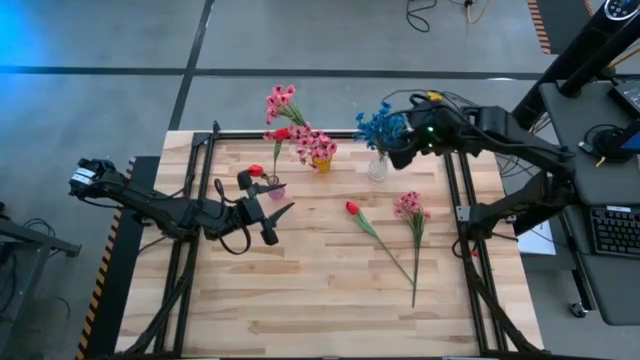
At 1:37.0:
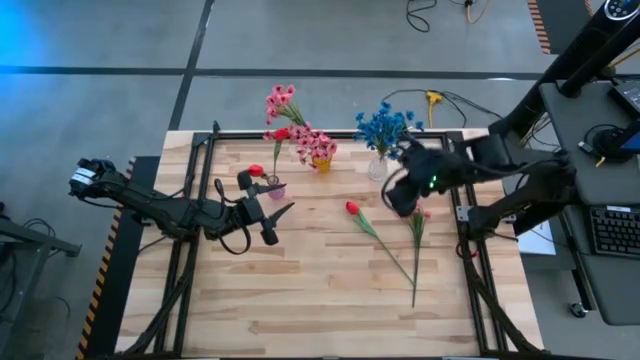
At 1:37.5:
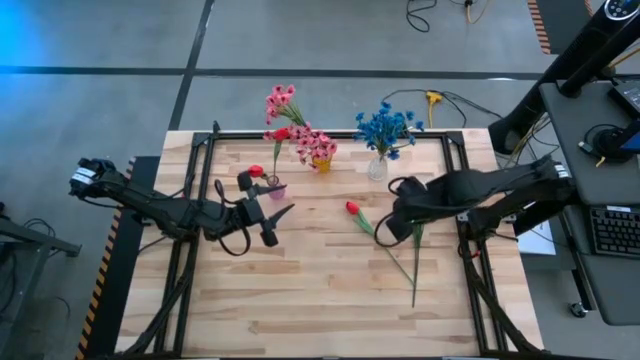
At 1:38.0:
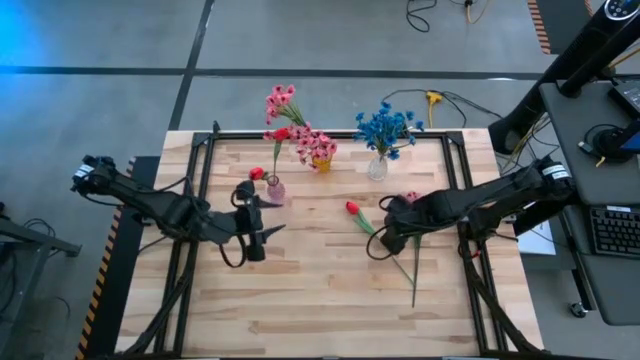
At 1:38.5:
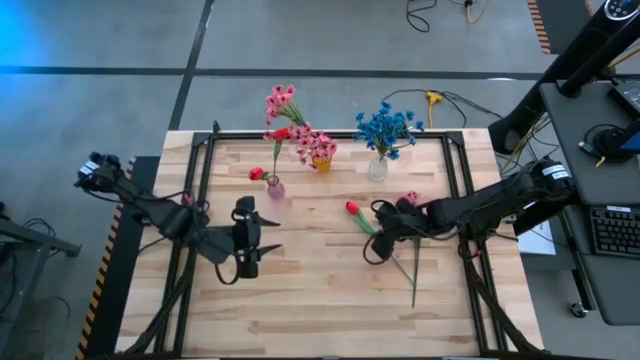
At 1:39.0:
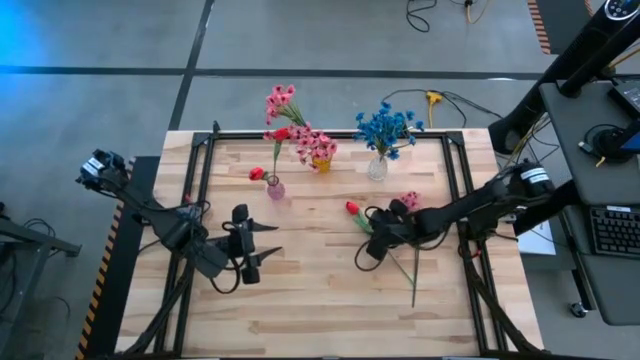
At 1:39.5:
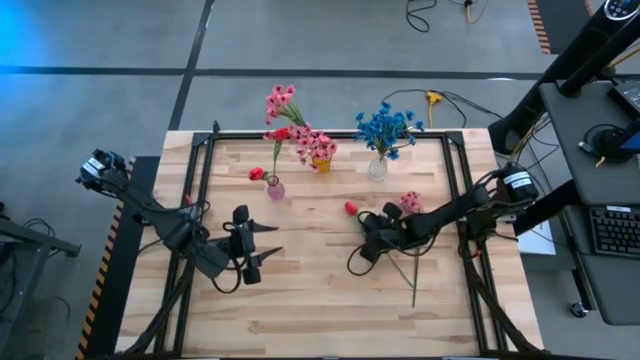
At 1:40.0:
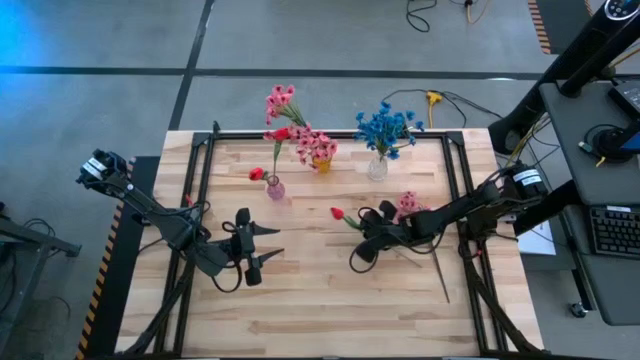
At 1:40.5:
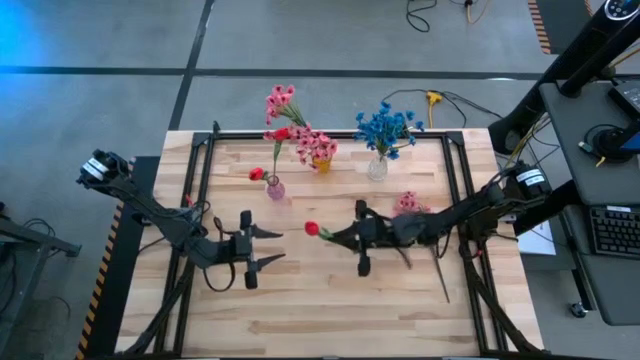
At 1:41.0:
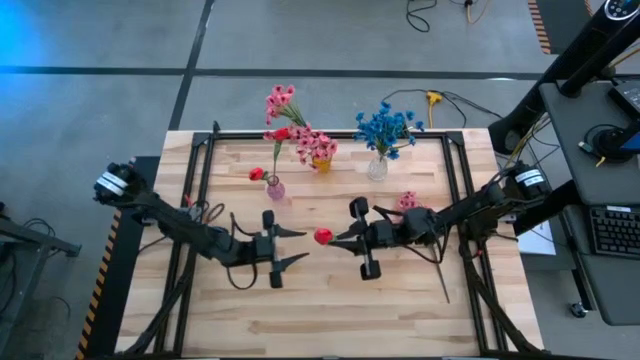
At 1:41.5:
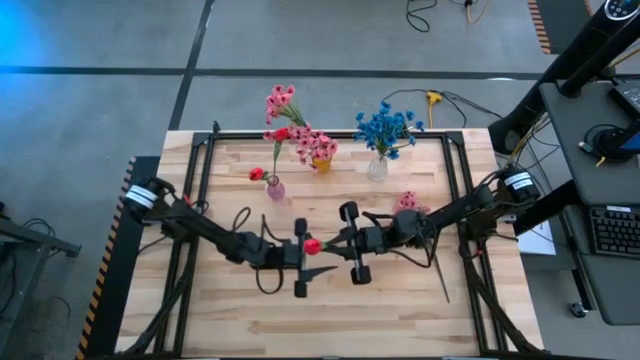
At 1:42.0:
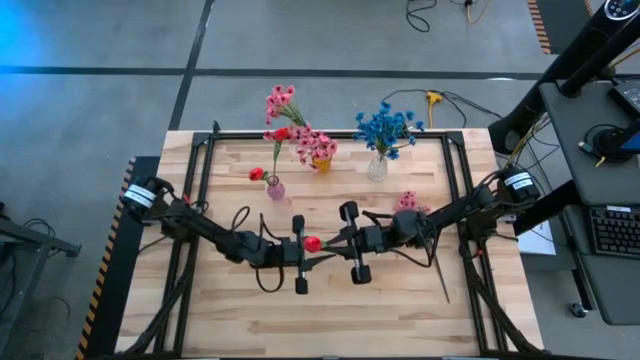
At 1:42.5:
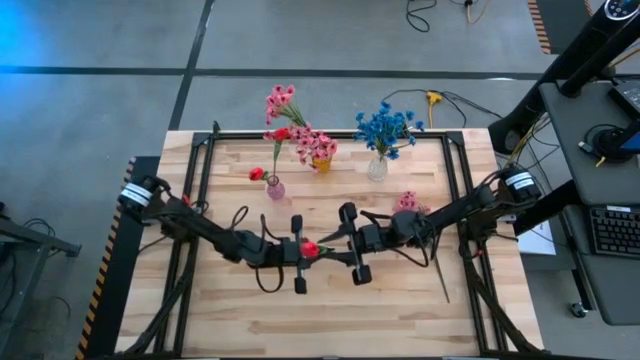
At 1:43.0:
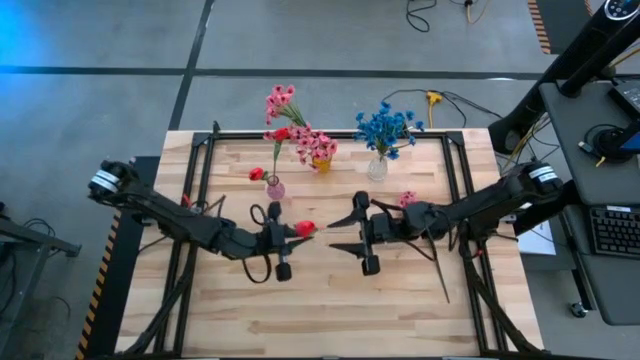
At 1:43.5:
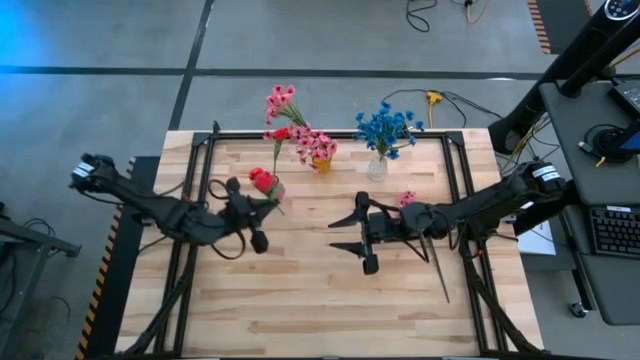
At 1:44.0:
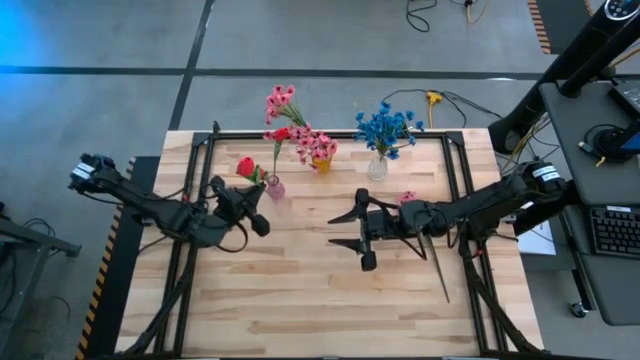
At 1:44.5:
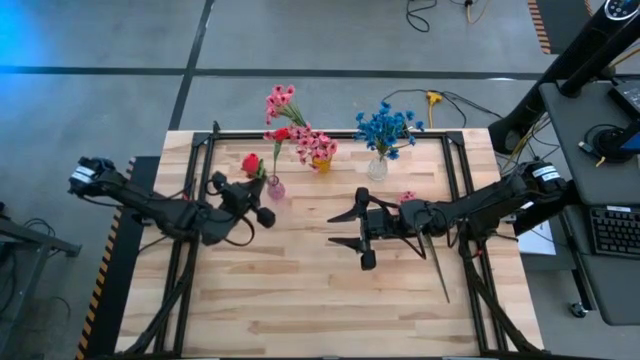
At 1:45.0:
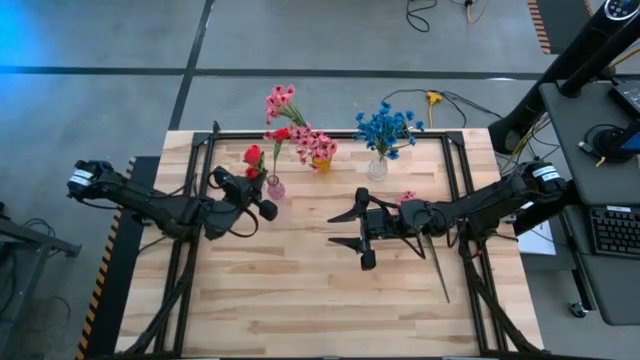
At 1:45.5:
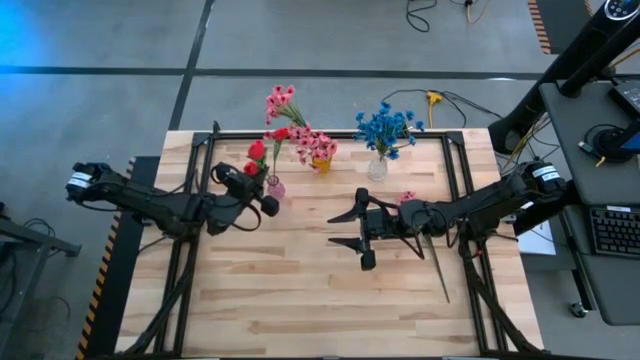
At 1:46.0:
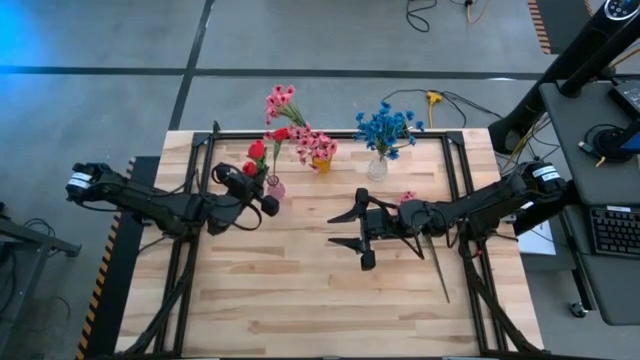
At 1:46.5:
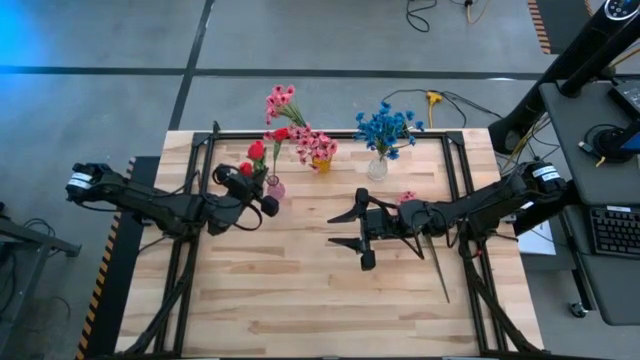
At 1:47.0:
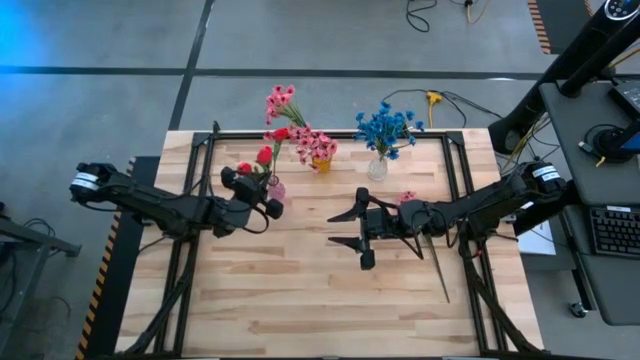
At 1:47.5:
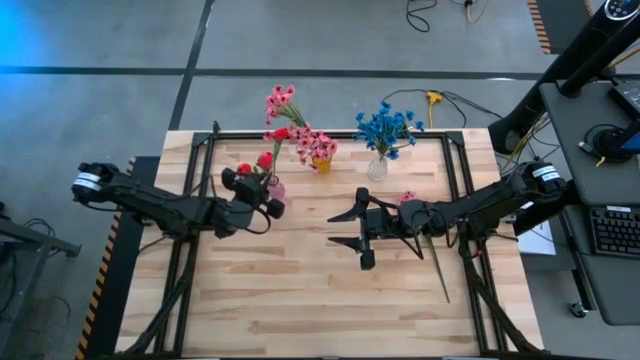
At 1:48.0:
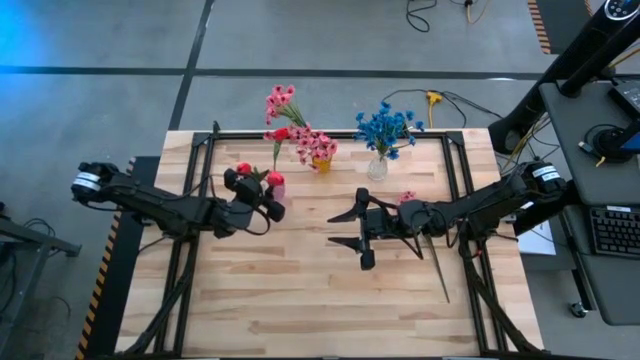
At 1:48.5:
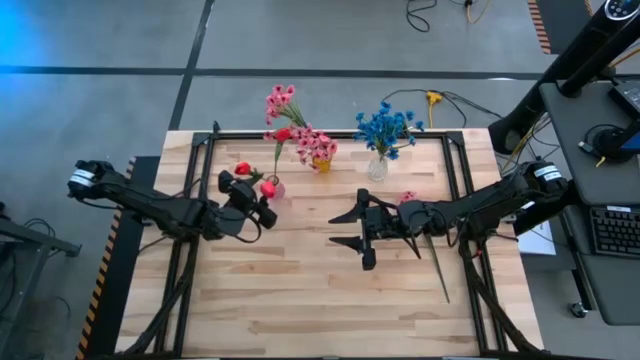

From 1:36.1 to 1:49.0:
Task: Sort flowers into vase by color
Put the red flower into the violet vase

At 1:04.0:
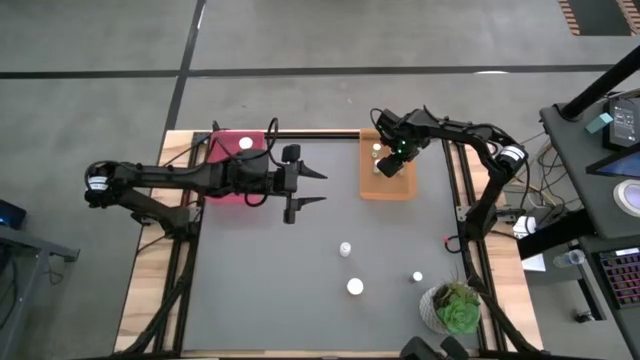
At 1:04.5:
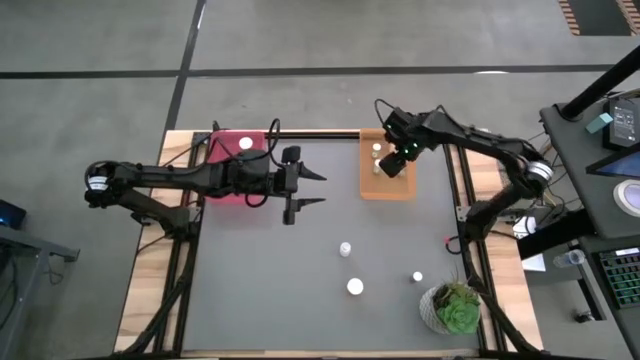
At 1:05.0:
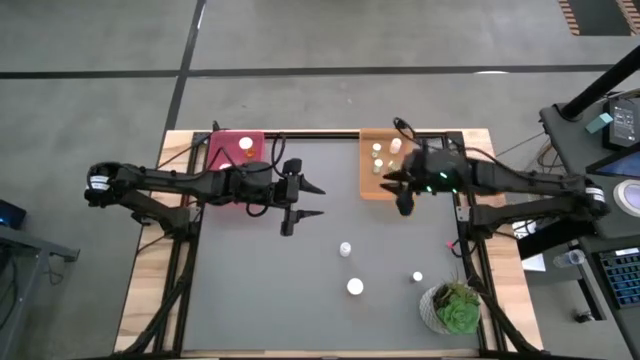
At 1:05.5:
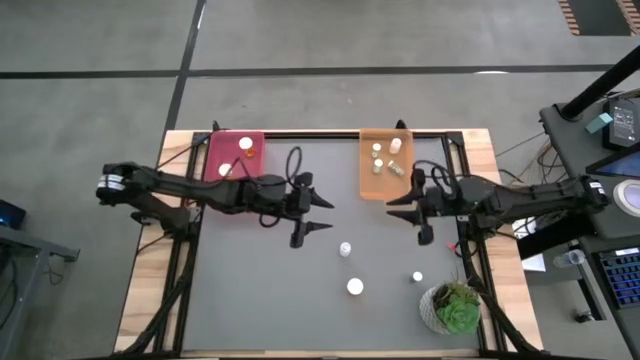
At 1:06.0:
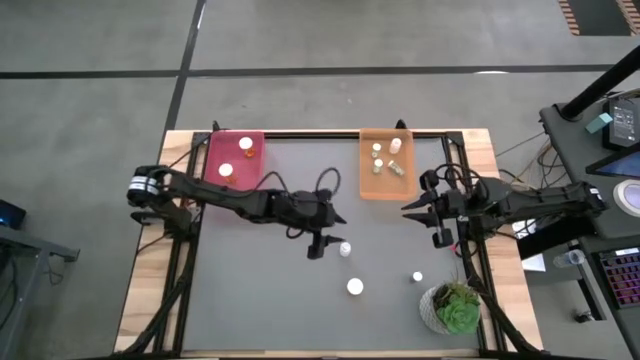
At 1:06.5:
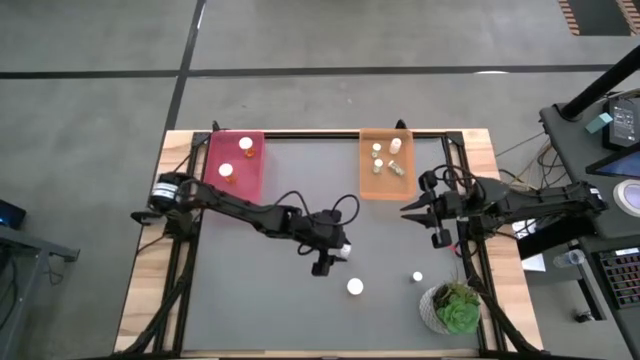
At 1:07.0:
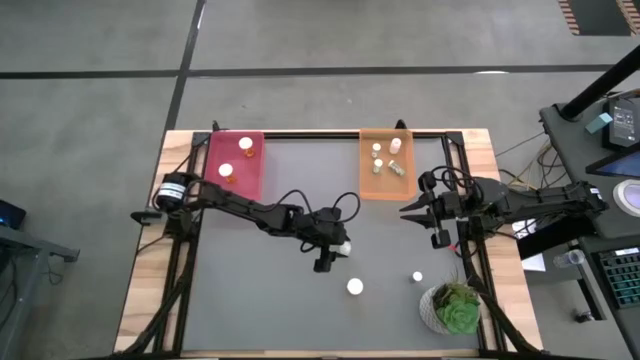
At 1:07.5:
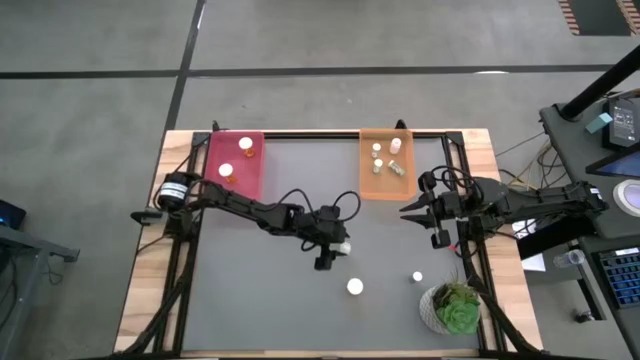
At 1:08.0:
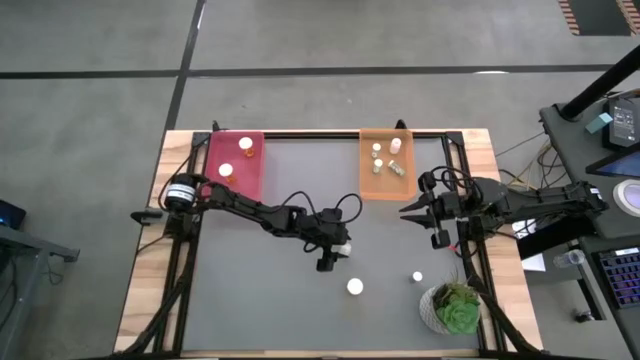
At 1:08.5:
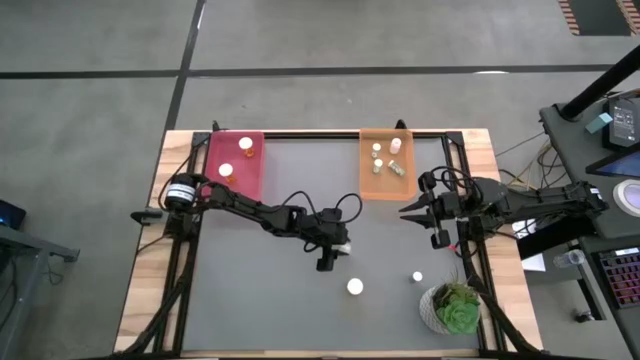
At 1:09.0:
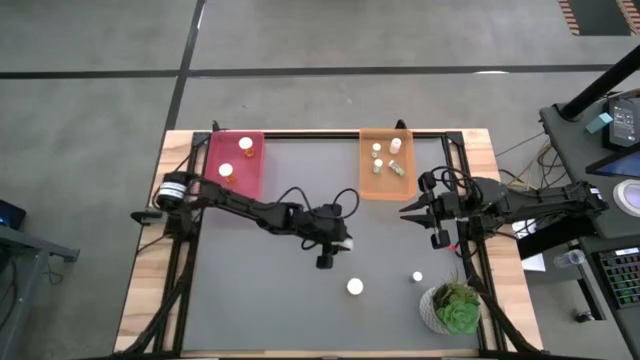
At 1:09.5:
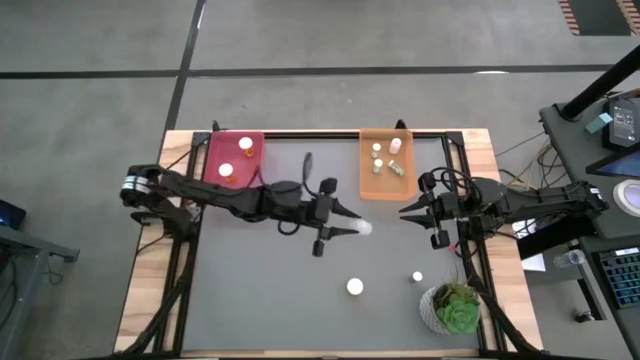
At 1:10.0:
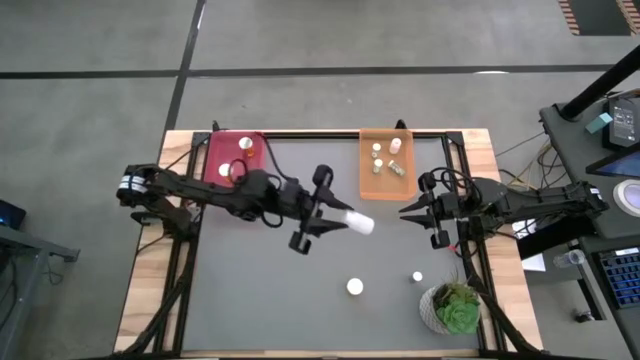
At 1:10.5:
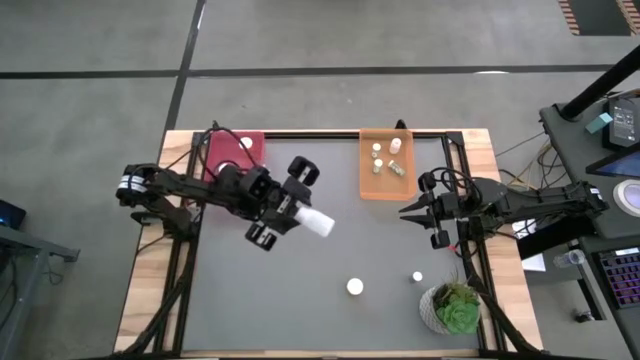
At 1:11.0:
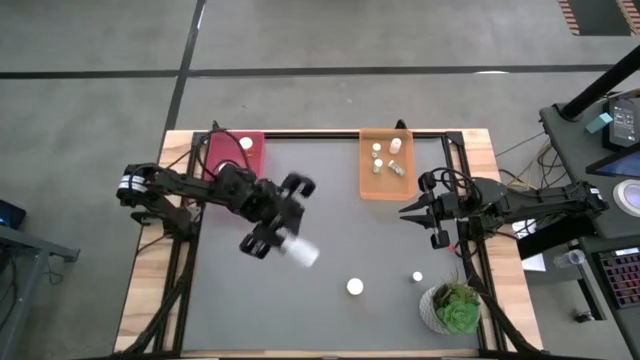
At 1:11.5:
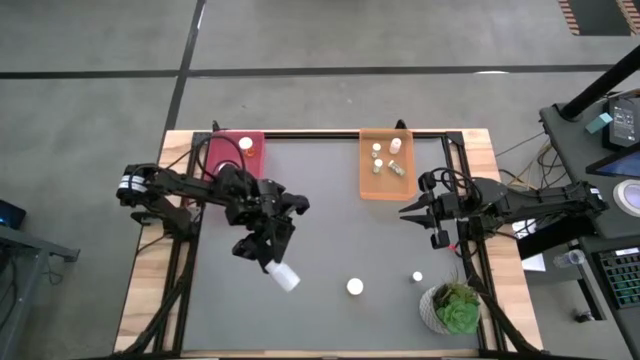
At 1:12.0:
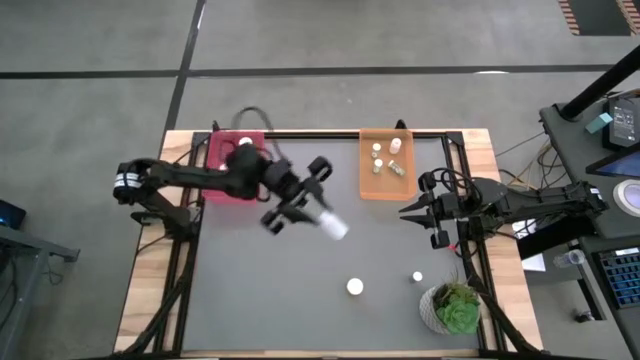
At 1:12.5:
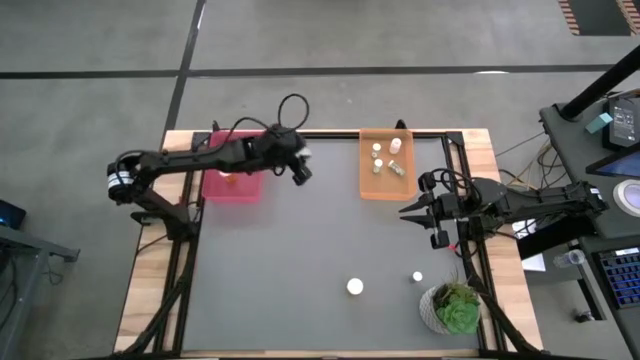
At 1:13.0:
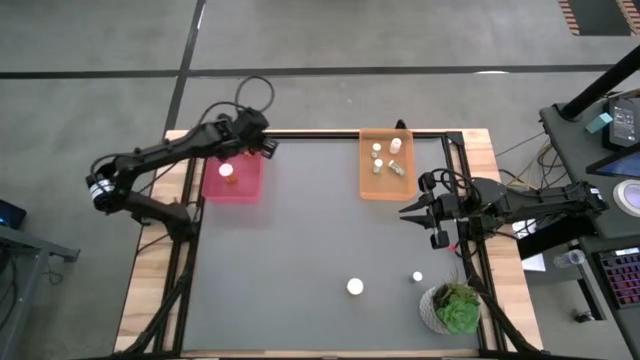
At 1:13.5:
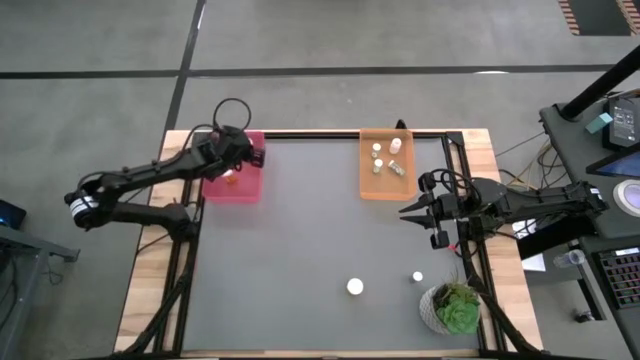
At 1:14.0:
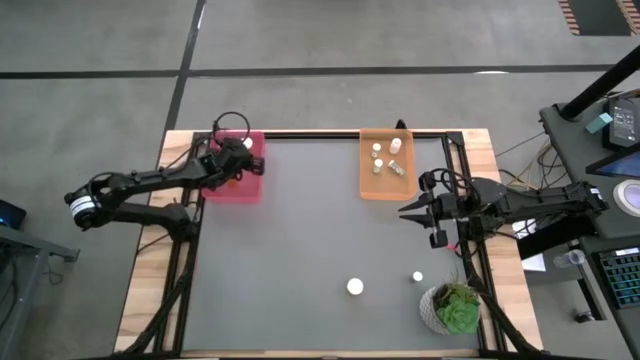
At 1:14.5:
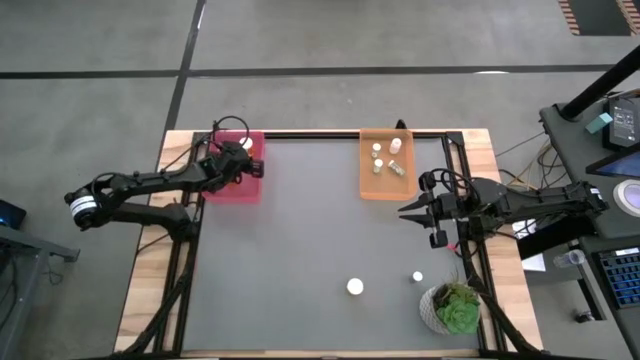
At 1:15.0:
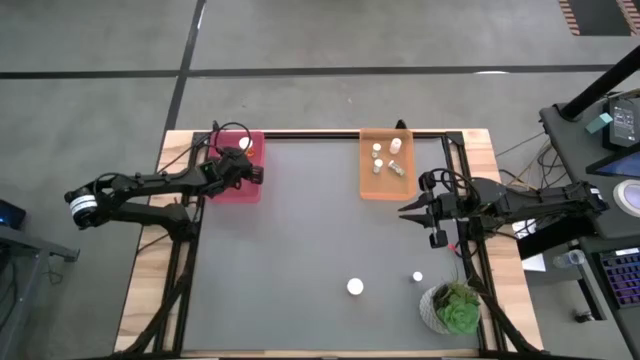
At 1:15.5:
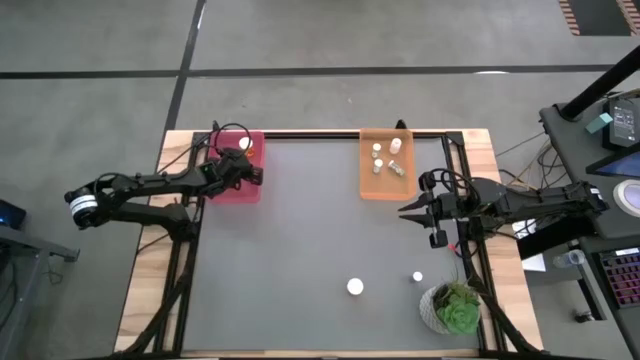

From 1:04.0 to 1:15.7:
Task: Pick and place medicine bottles into bin by pill shape (circle, oval)
Put the white capsule bottle into the pink bin
